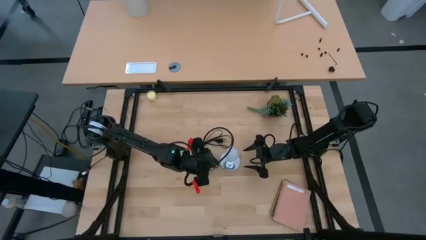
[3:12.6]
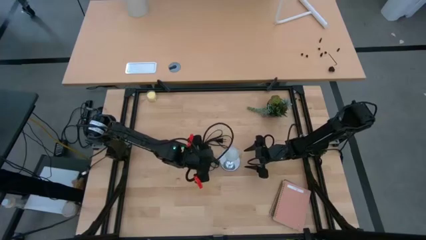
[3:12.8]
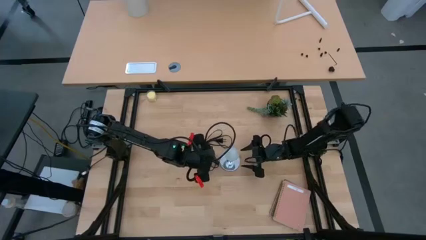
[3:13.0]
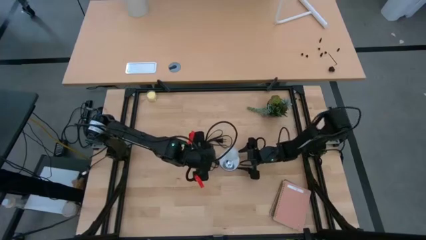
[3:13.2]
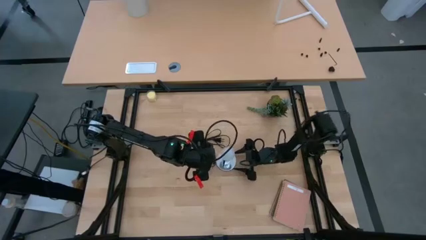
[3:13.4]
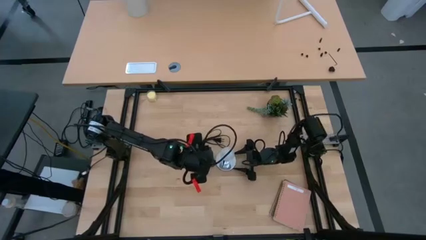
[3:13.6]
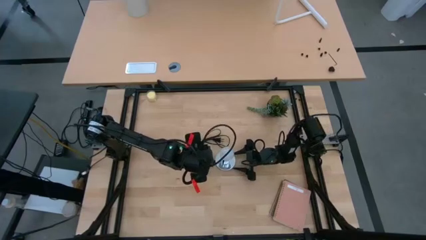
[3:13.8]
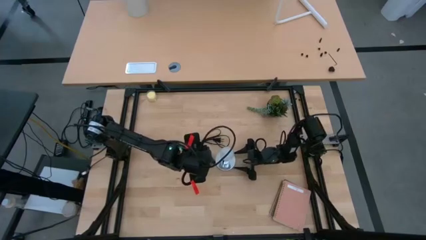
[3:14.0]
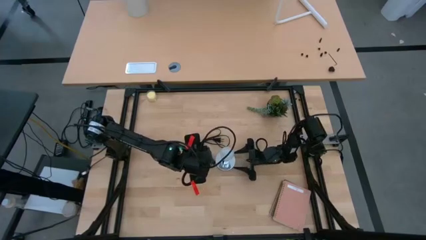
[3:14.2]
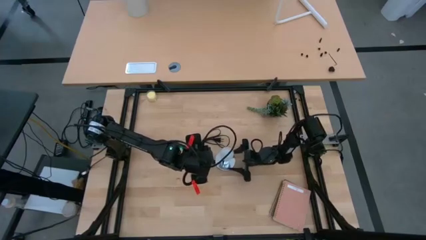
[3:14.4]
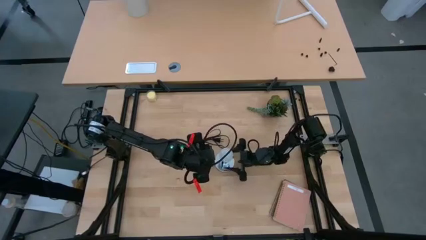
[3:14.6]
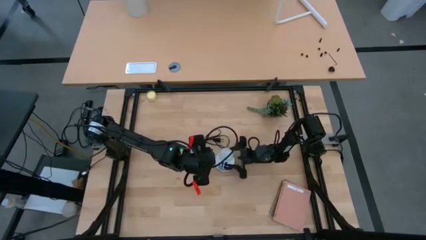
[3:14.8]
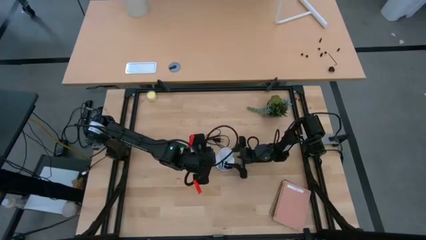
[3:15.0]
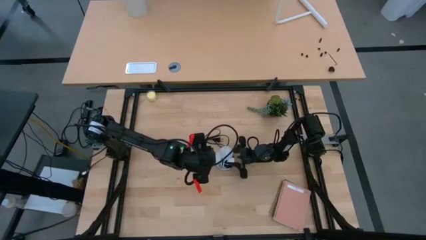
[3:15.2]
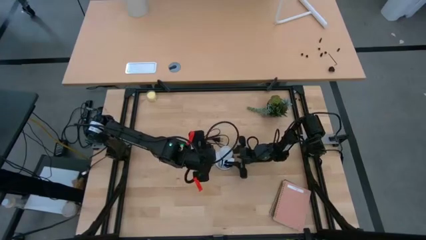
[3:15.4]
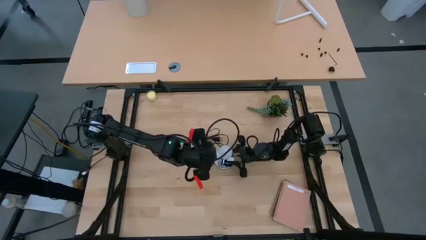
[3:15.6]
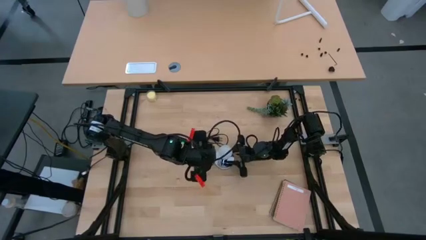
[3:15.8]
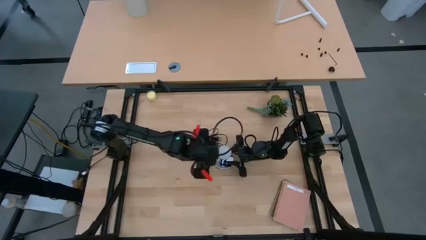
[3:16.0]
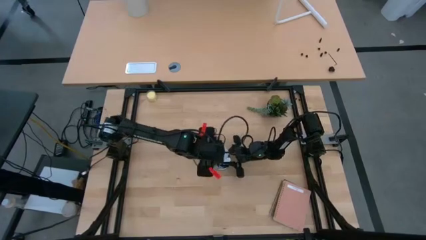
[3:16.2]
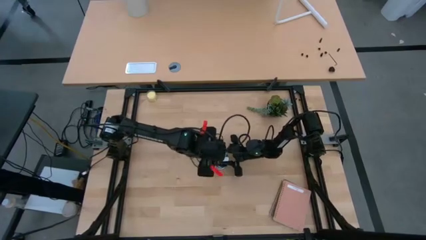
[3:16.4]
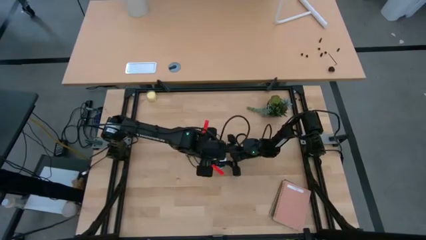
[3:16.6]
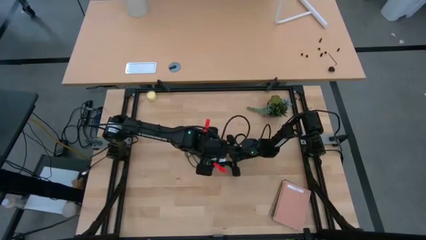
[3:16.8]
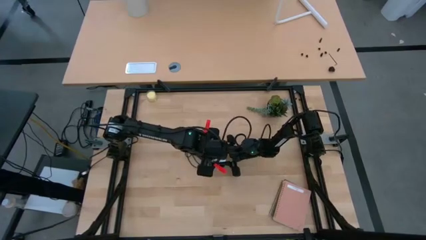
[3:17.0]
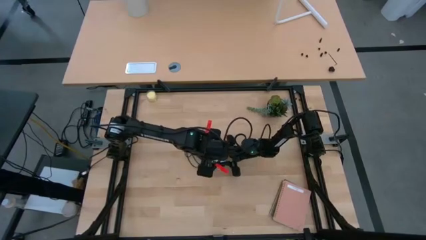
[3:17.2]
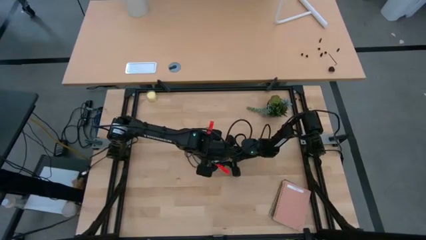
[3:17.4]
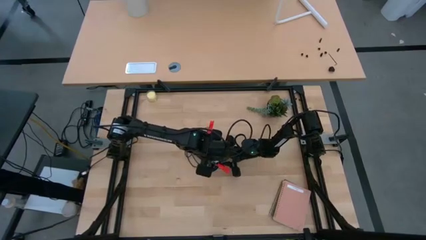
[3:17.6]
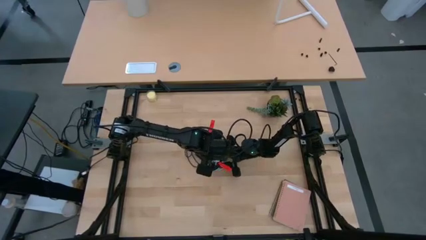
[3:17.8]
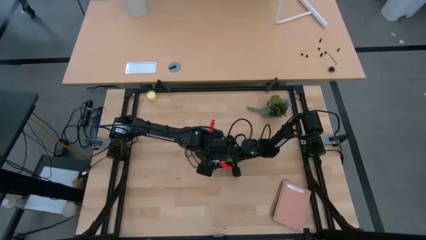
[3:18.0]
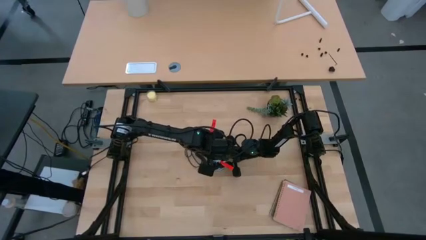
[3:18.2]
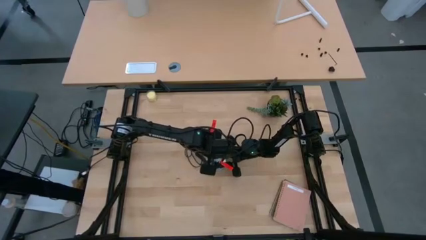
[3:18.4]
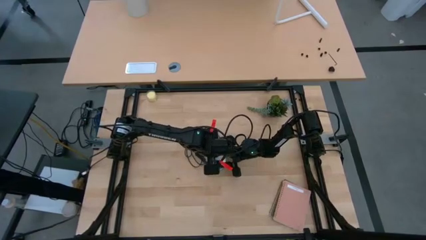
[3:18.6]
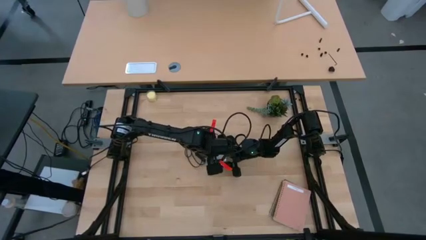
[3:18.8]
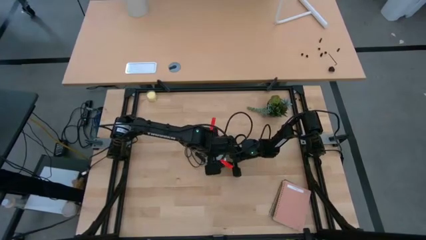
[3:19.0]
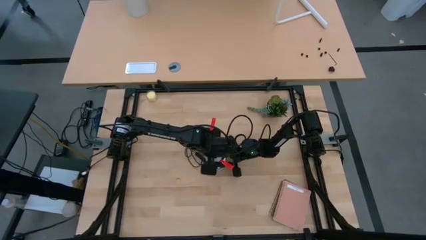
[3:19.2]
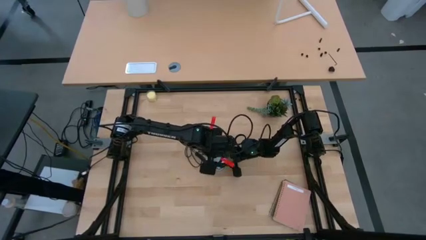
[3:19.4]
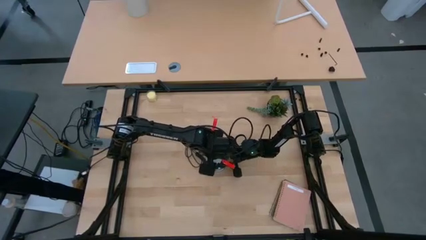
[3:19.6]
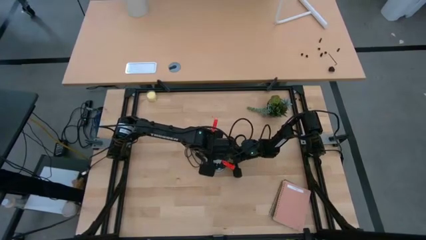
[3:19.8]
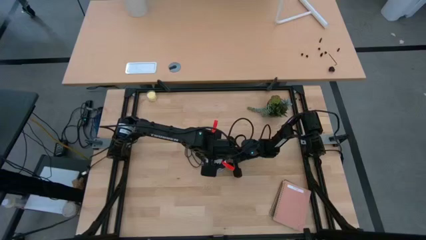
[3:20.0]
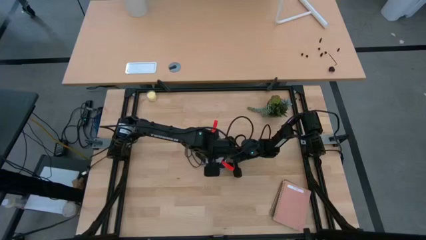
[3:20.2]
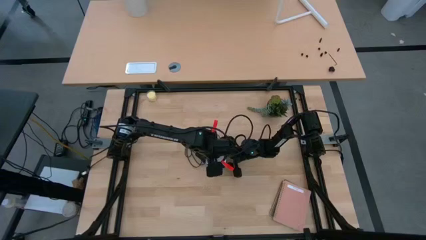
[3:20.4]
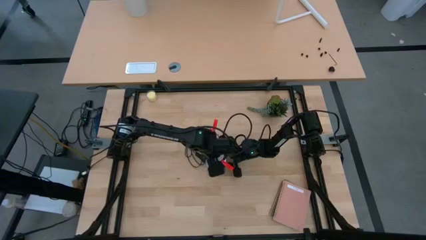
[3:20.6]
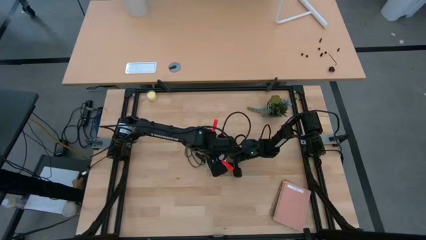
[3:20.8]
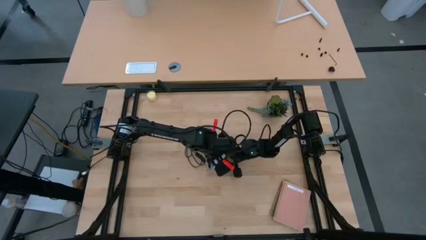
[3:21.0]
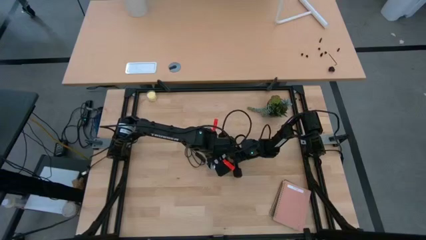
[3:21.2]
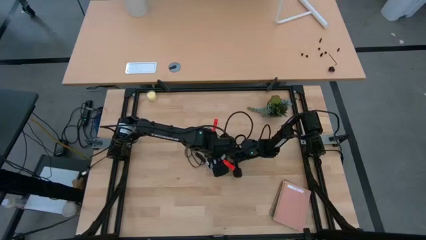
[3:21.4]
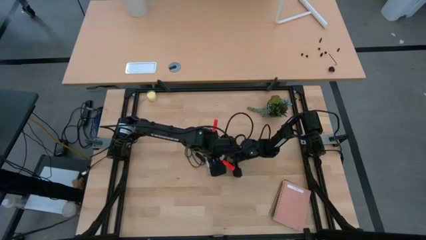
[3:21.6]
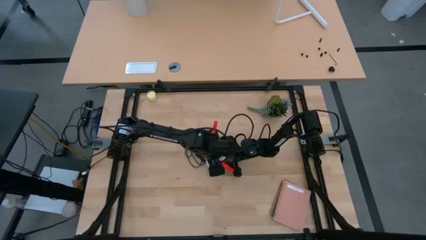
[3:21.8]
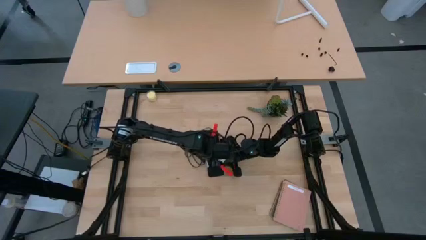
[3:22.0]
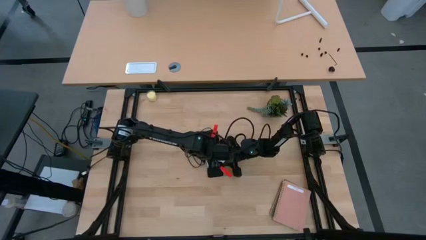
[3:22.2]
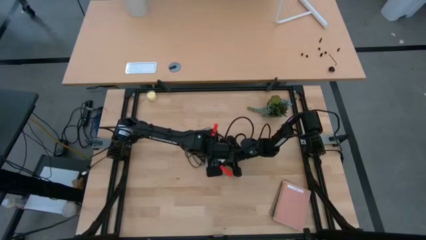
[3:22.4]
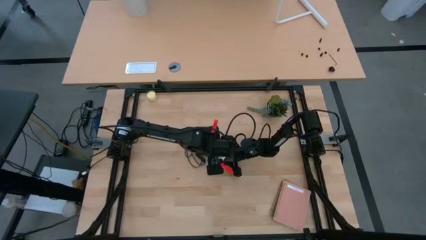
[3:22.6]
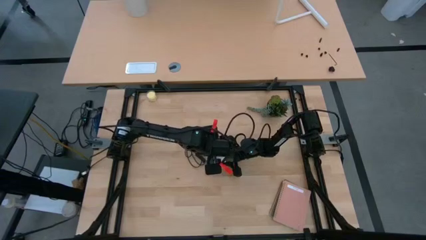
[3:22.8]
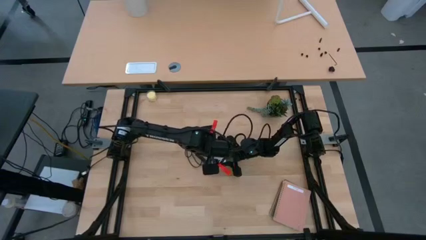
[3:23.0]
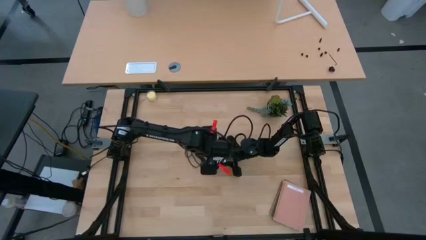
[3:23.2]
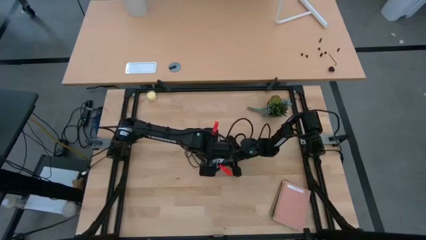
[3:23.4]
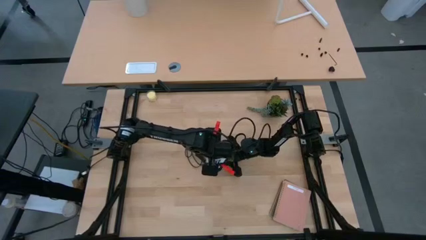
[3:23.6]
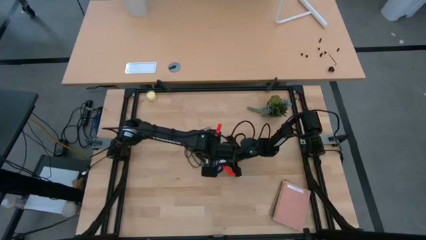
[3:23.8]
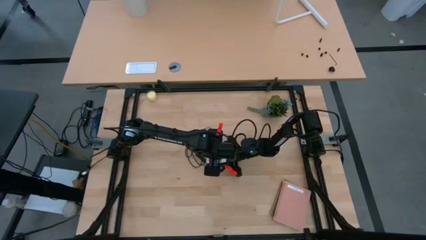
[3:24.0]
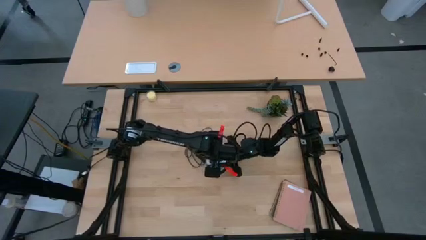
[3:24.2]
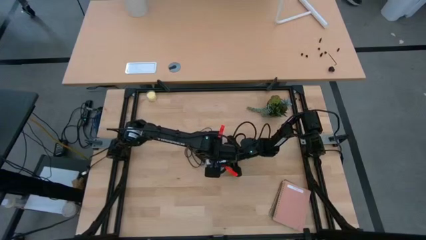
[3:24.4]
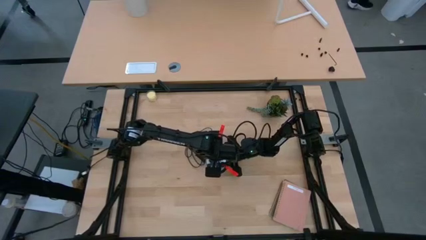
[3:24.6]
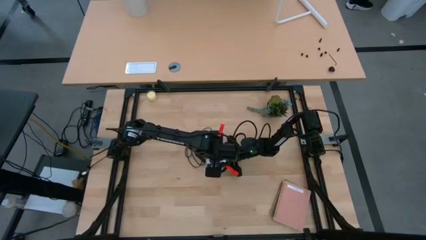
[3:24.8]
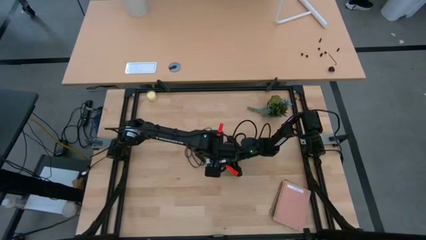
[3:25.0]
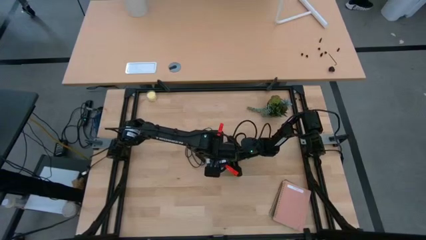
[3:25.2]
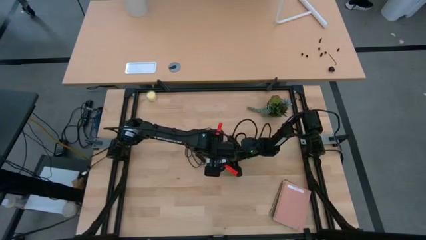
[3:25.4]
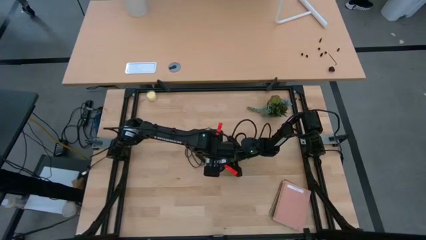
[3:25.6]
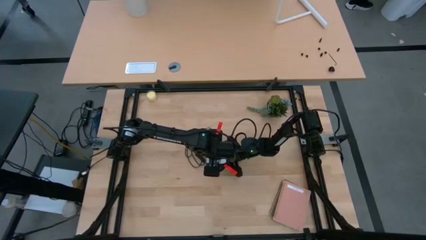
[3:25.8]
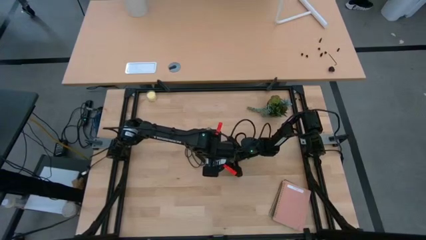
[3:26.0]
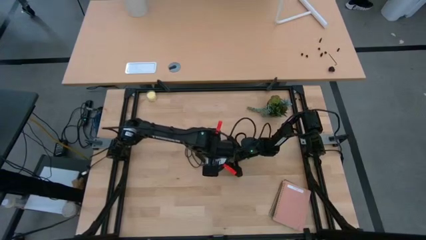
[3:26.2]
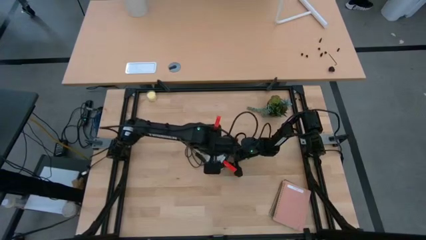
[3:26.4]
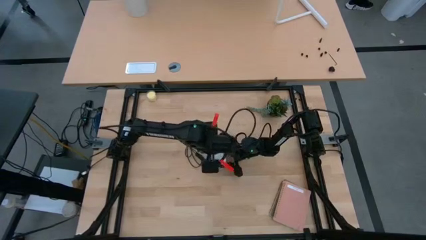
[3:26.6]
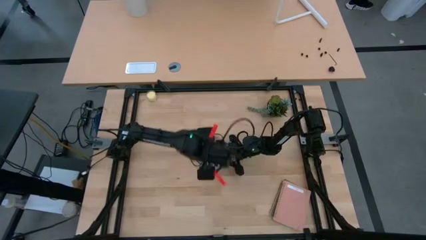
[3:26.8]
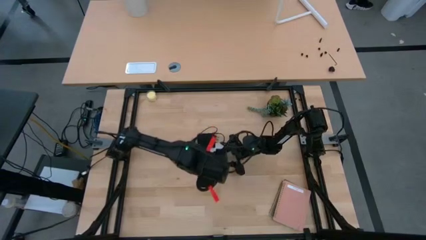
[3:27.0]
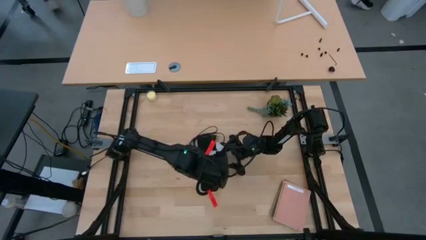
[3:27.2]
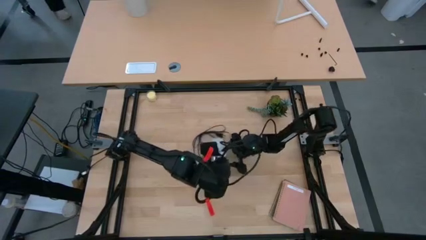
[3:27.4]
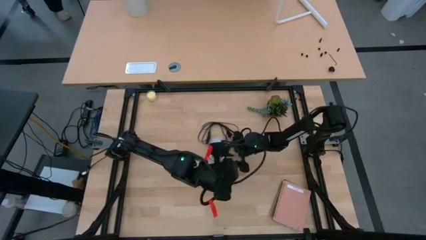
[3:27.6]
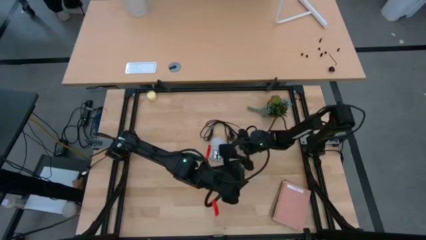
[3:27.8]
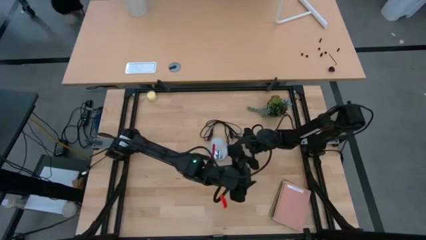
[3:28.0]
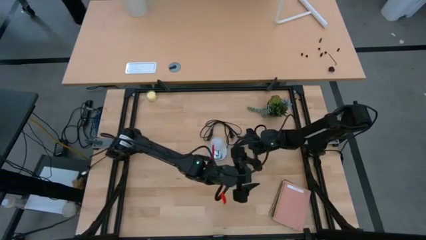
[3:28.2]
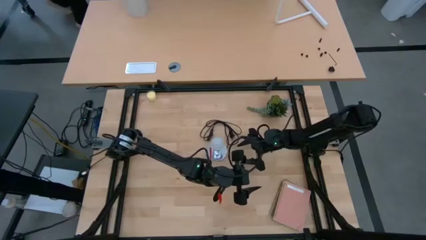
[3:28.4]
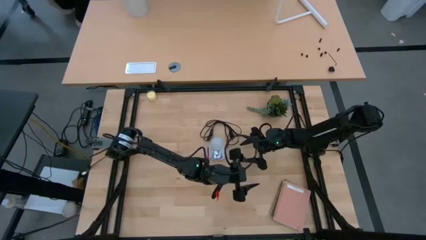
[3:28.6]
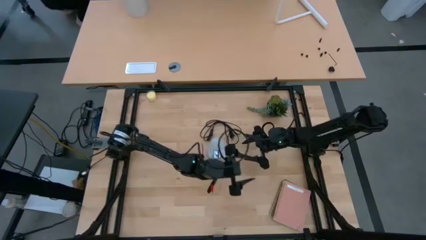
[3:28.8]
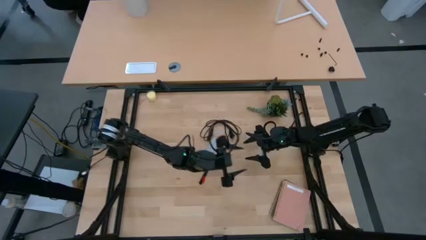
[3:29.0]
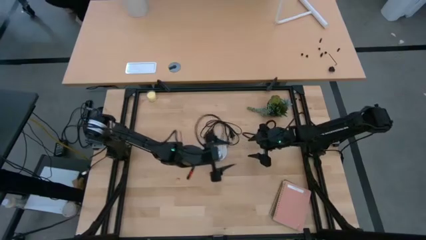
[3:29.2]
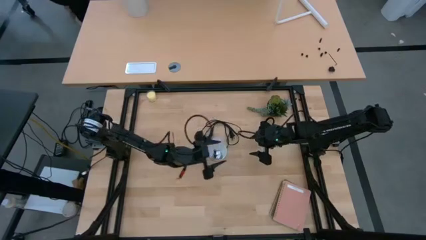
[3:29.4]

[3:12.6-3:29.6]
Task: Screw lightbulb
Remove the white lightbulb from the metallic lamp
